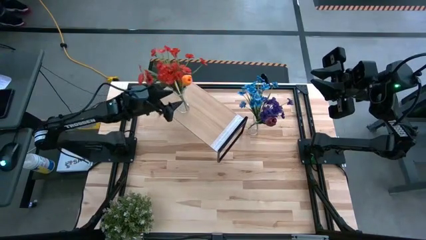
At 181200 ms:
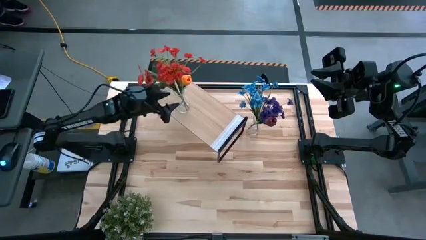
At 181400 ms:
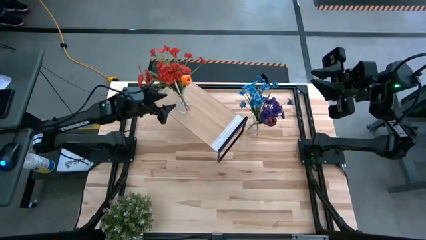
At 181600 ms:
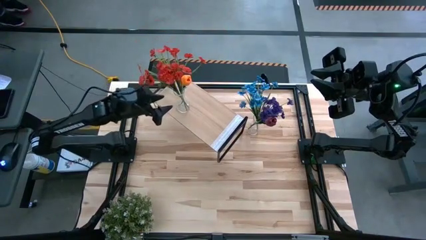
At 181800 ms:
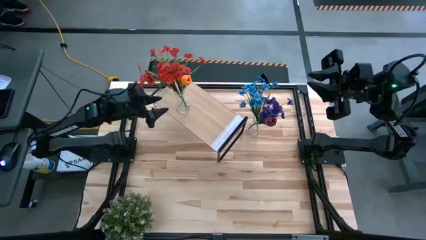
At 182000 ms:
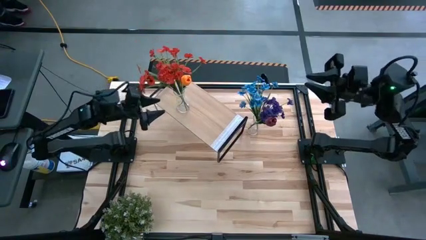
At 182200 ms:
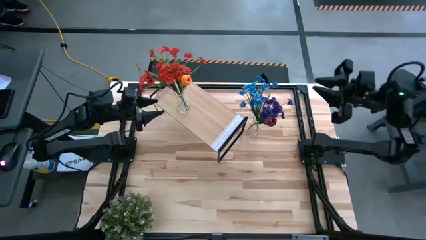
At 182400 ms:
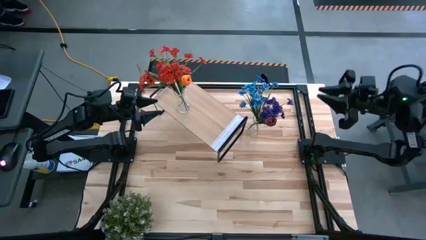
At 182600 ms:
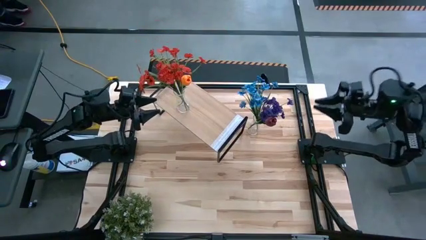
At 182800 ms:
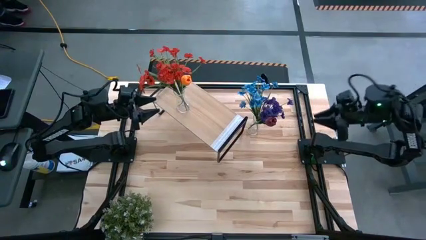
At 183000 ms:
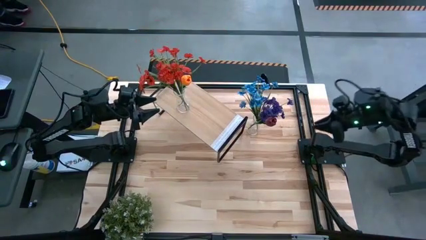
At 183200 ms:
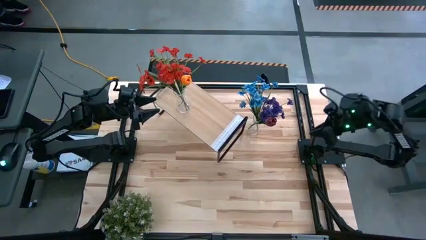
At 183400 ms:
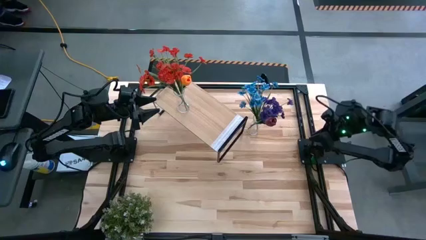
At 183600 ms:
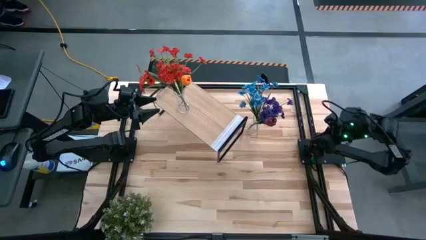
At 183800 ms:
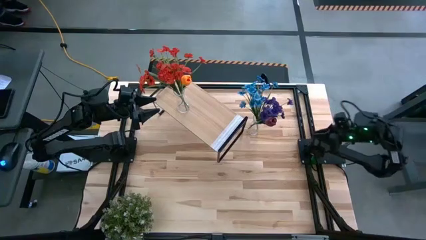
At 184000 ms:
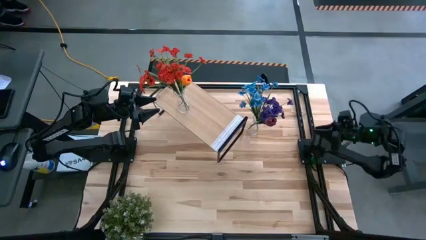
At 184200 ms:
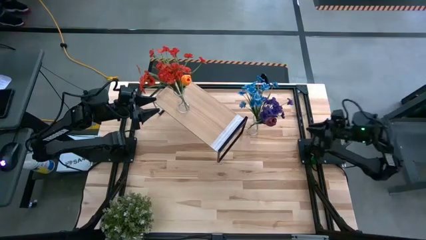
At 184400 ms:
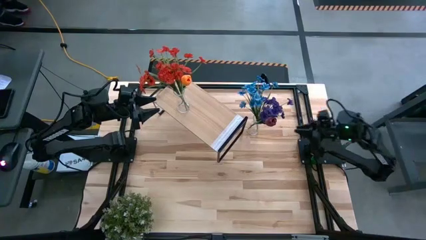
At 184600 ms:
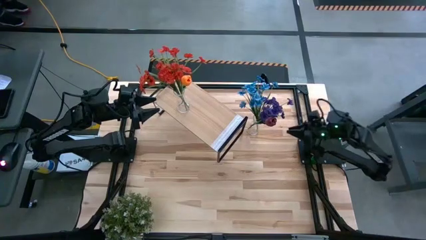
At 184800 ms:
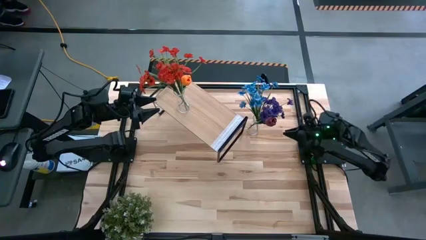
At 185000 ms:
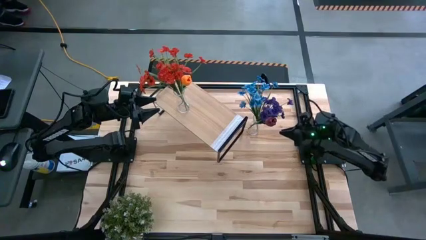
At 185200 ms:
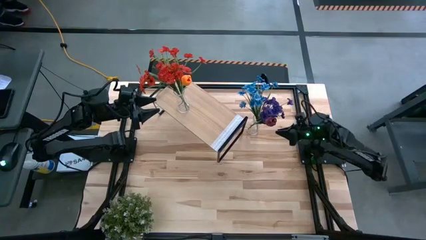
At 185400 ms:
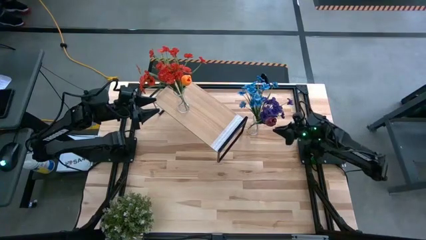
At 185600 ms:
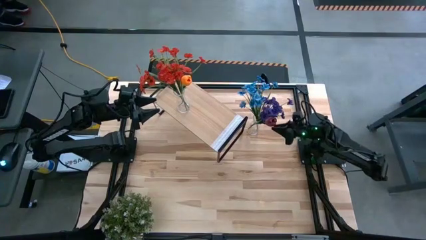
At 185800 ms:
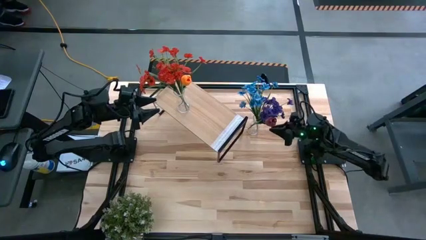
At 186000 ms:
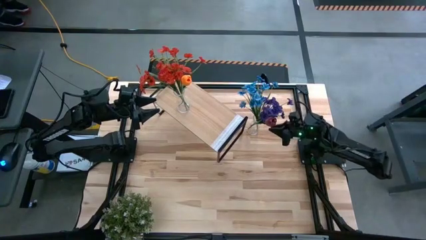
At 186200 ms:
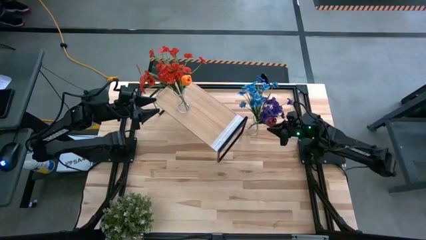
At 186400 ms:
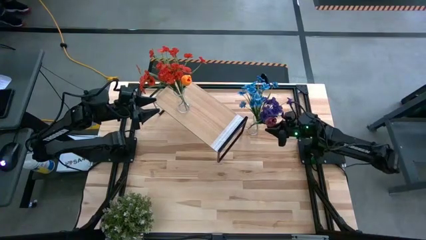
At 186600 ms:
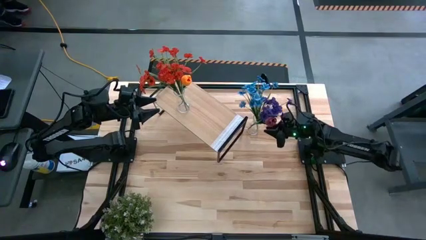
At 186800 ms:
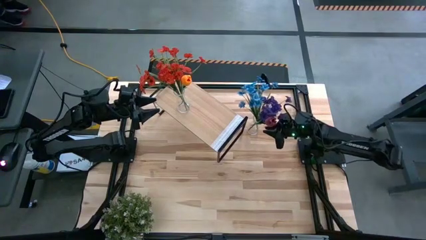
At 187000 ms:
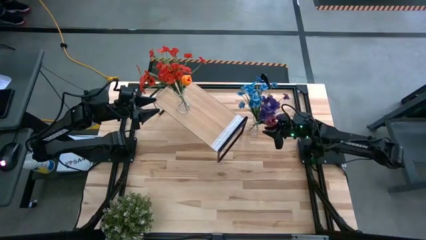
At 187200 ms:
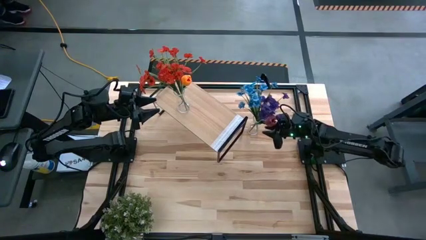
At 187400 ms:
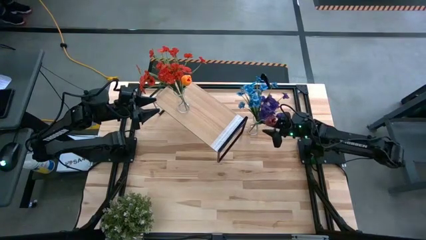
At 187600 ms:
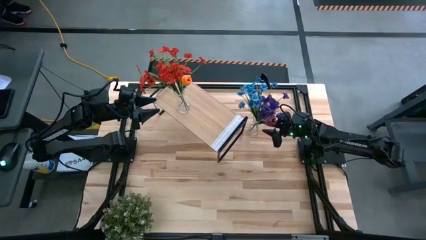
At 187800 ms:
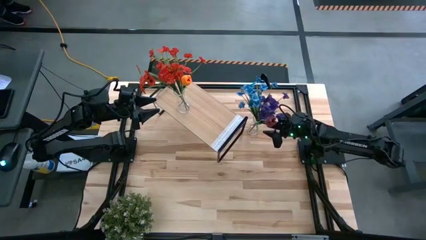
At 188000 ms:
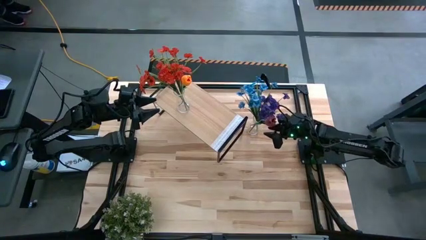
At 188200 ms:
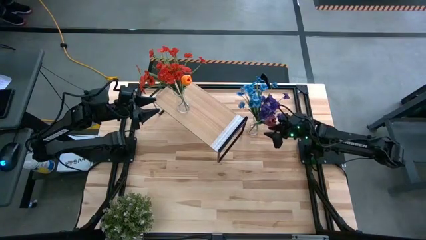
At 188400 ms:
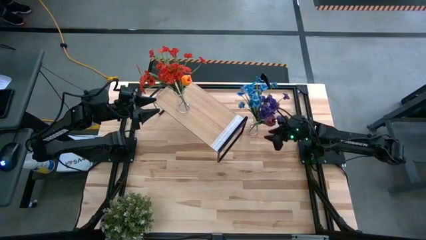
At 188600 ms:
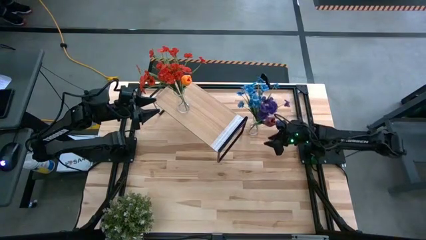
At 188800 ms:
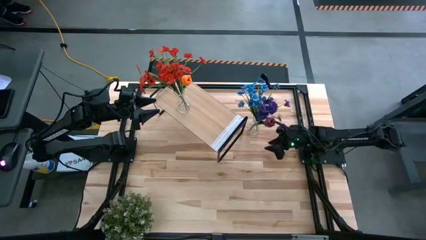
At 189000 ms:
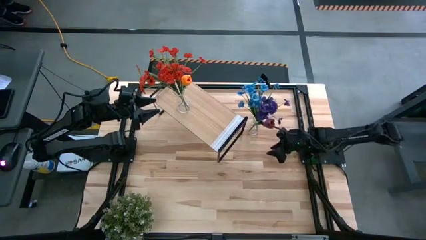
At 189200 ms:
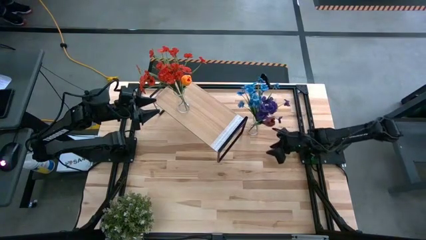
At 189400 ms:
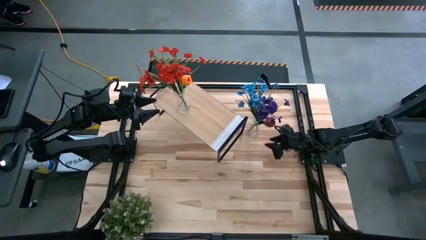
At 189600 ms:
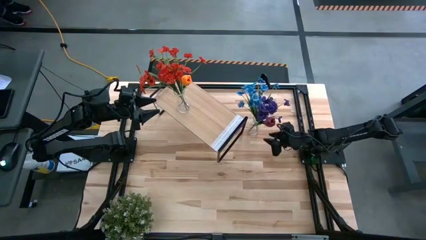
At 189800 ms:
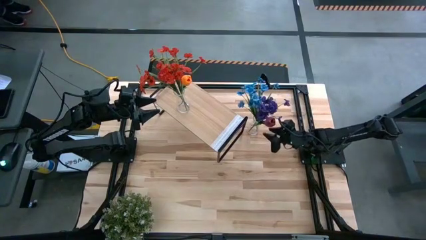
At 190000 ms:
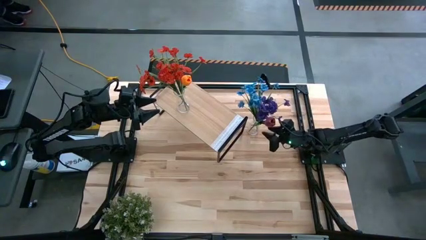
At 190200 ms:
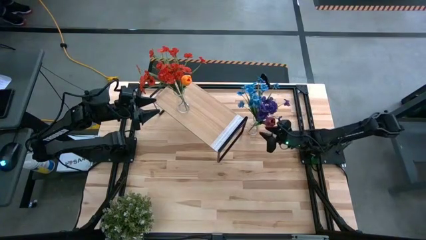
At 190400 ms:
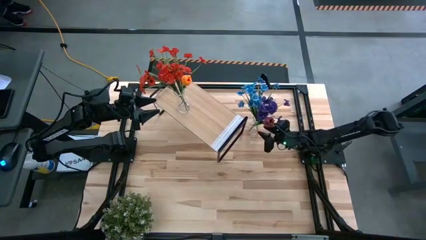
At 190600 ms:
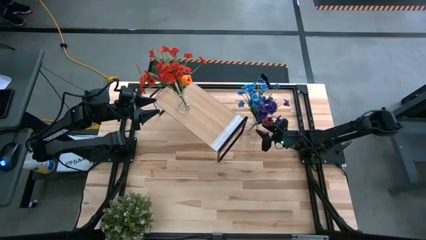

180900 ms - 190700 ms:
Task: Pick and place flowers into a vace then onto a shelf
Put the transparent vase on the shelf

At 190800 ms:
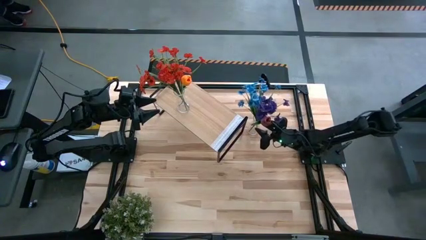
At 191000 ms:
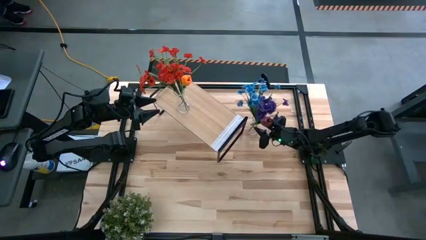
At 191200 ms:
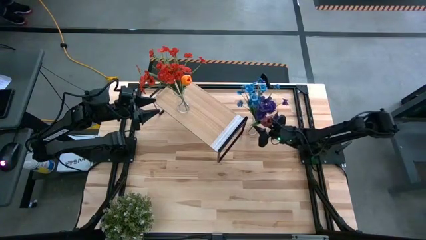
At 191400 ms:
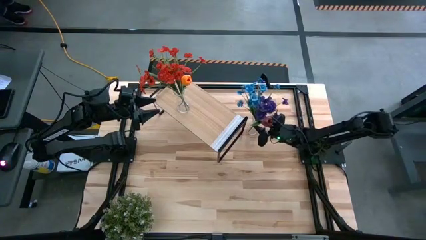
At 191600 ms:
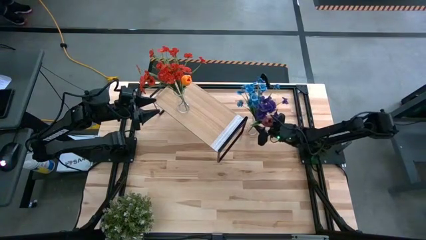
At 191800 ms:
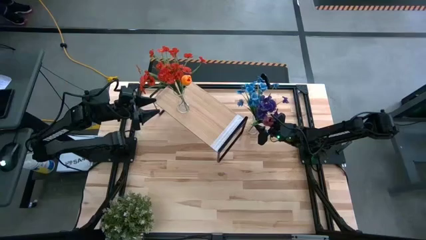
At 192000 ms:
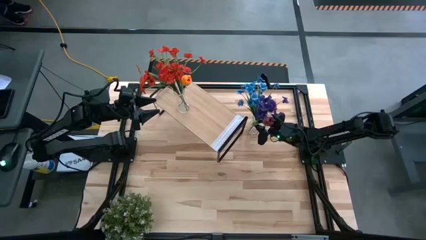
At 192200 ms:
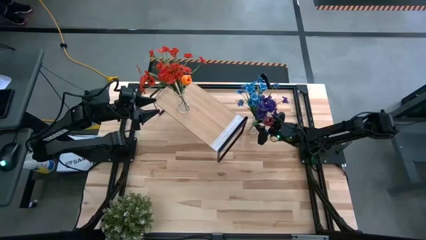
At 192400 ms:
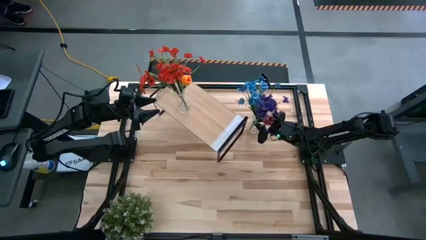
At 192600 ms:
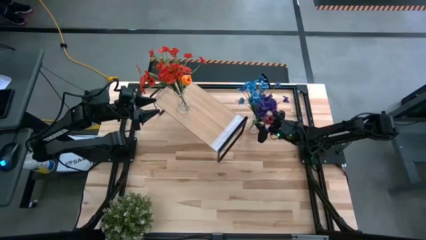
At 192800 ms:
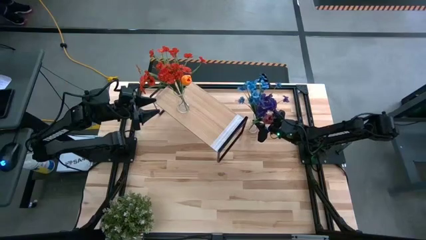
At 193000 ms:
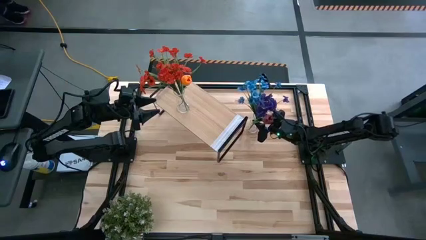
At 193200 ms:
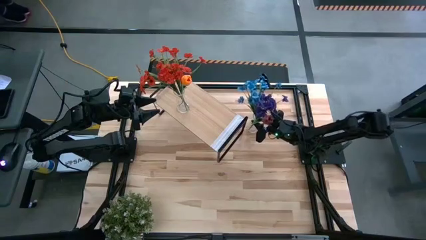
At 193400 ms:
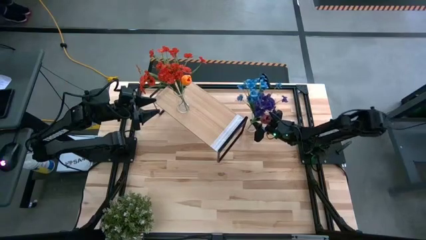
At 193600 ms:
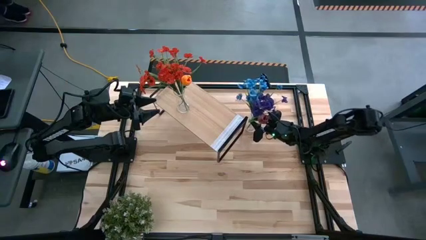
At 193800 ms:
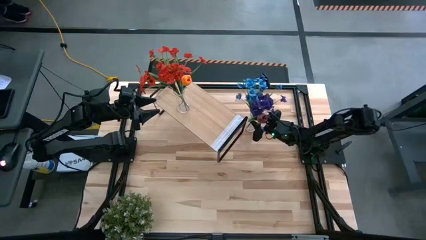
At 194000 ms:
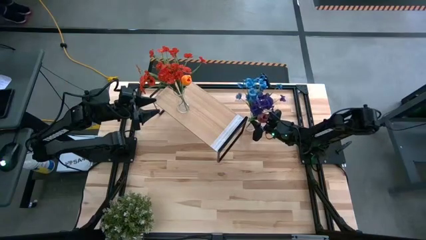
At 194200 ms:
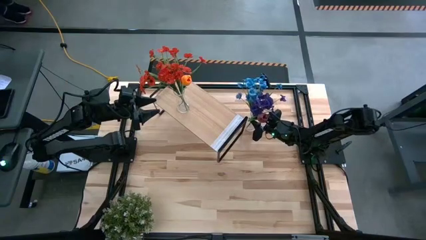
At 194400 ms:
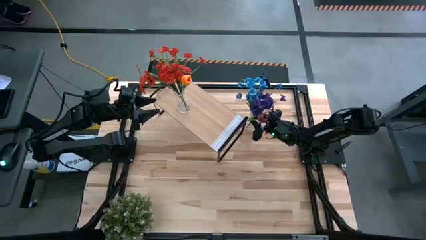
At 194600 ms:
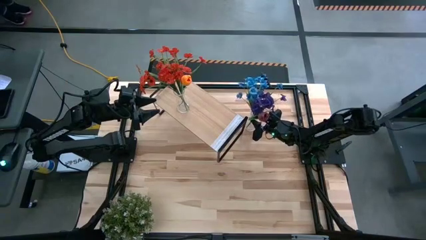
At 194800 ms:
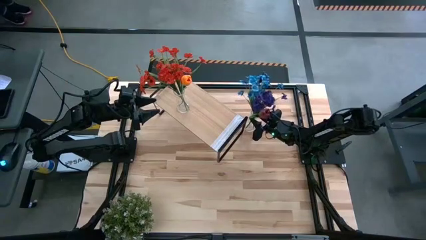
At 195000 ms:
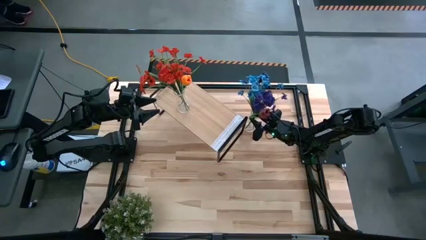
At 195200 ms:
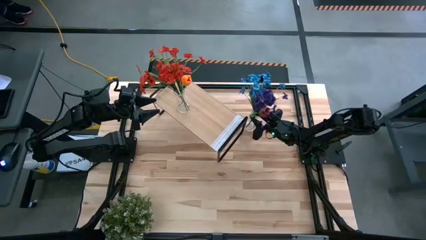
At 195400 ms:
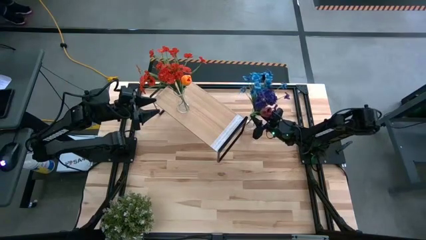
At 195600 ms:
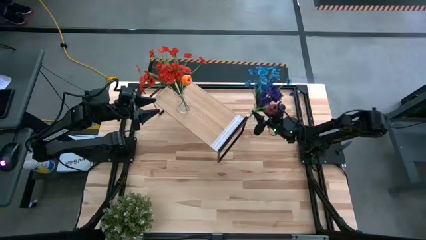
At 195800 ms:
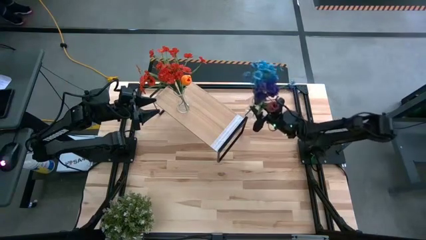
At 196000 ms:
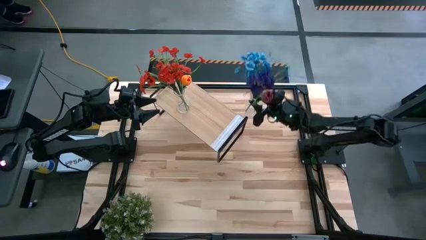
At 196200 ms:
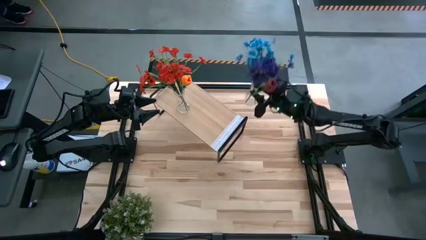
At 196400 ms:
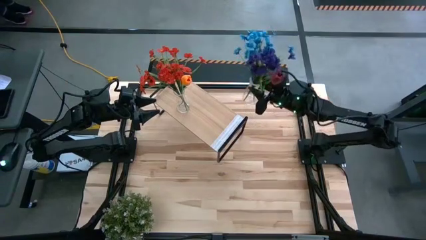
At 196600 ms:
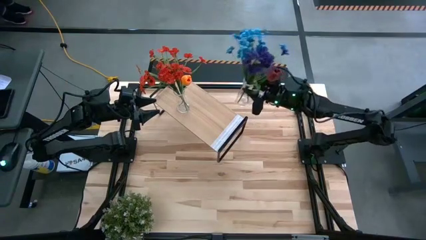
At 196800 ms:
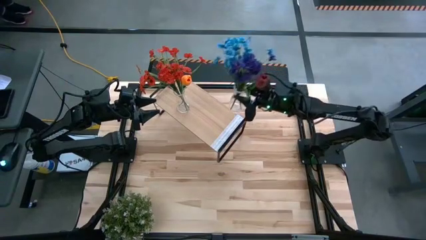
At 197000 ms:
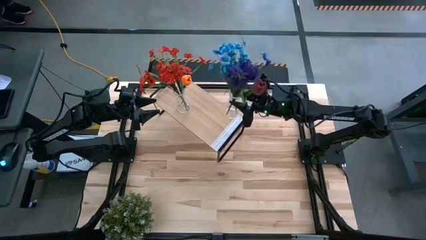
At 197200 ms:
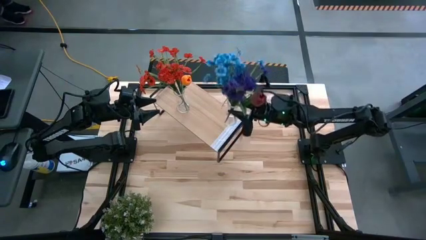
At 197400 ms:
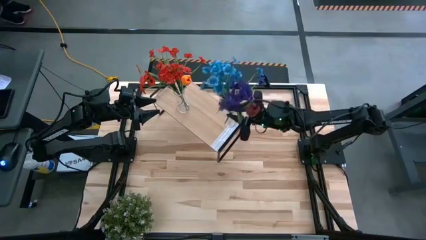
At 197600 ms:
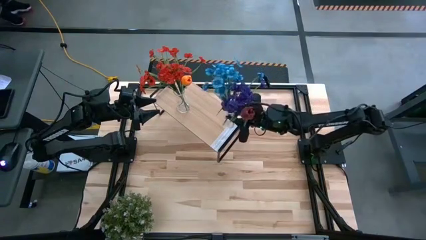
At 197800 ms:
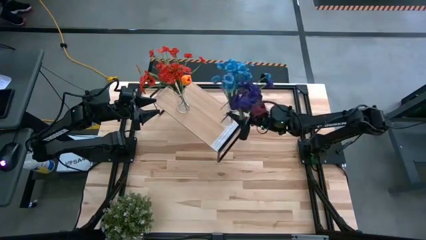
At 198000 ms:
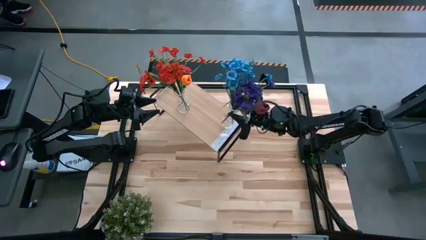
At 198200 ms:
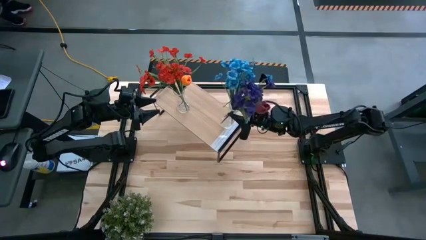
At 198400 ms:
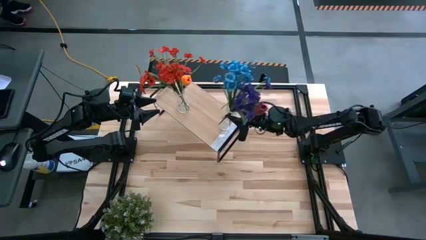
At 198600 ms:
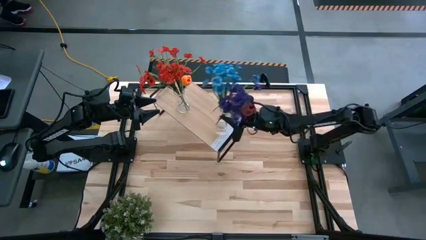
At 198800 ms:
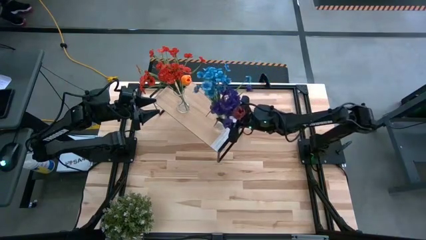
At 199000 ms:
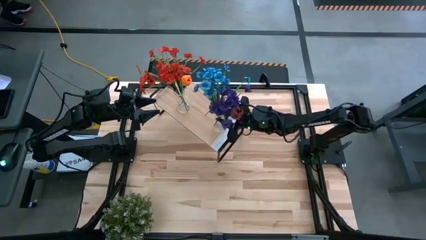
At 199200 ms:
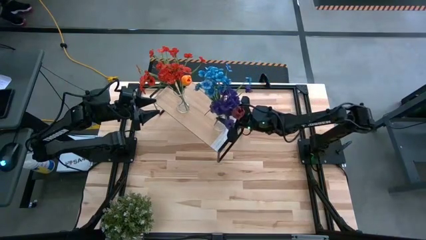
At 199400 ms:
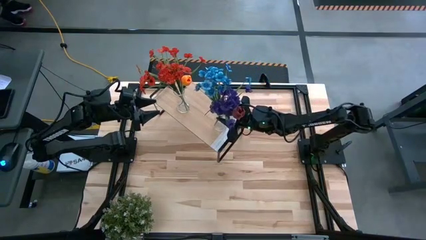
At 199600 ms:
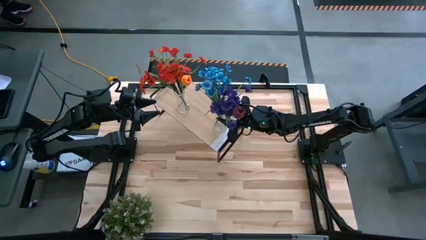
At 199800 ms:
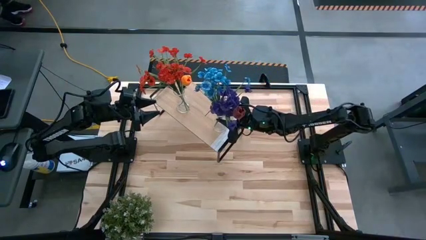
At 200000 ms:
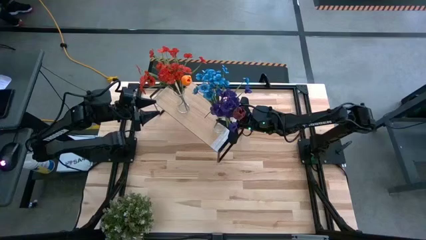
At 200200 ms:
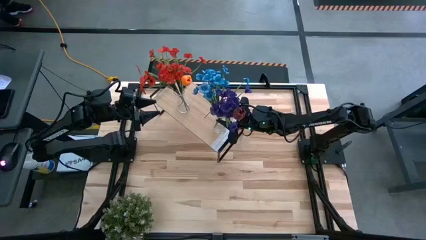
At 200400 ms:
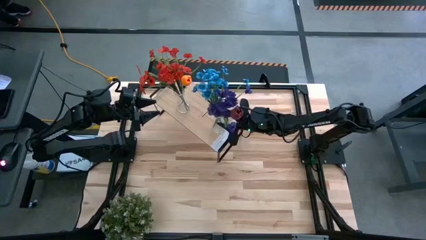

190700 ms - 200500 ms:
Put the transparent vase on the shelf
